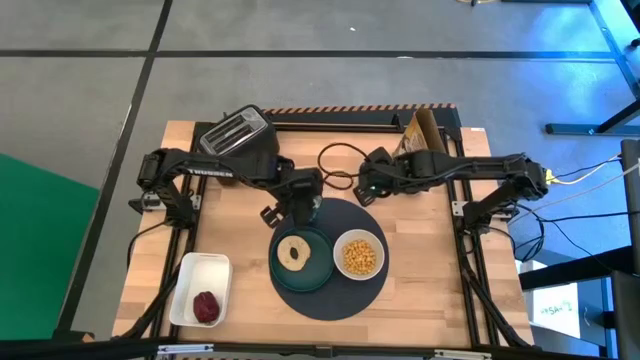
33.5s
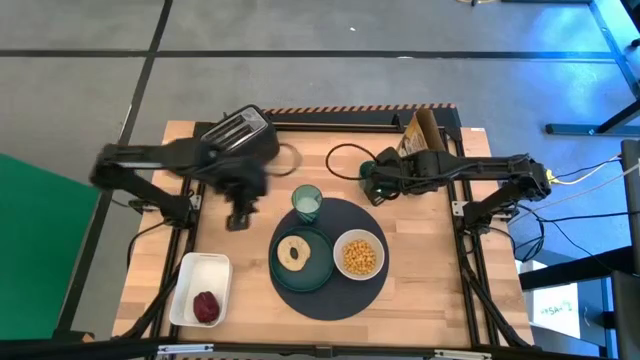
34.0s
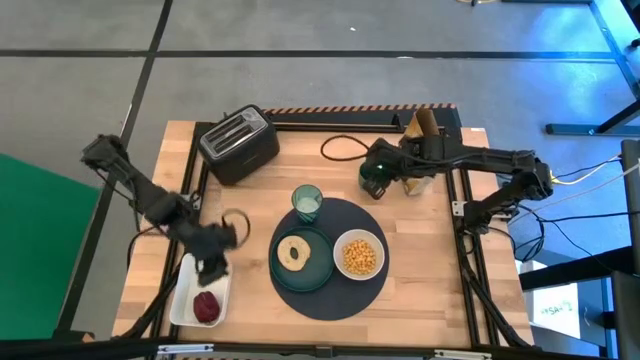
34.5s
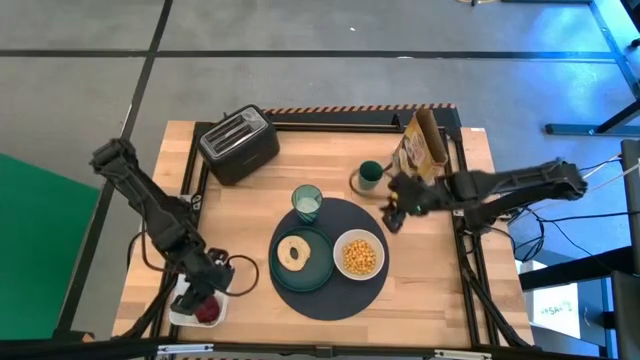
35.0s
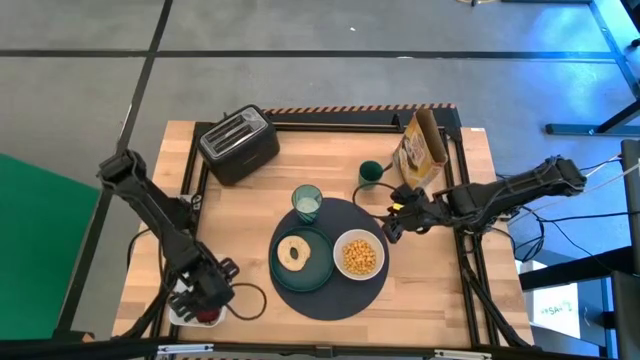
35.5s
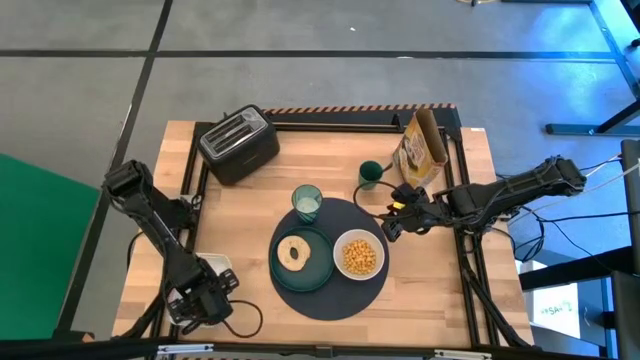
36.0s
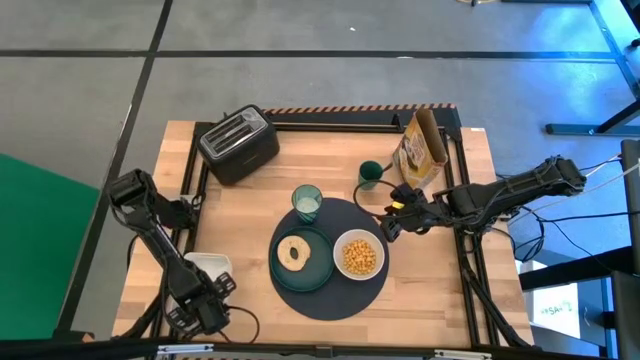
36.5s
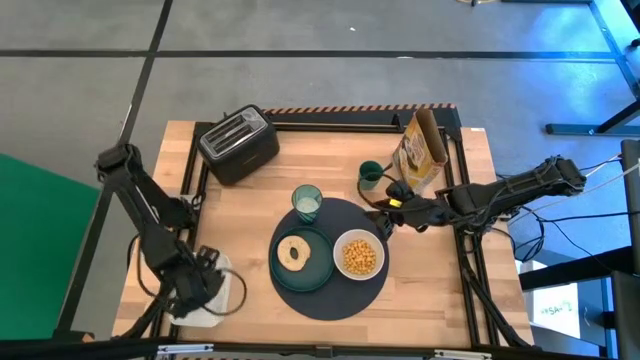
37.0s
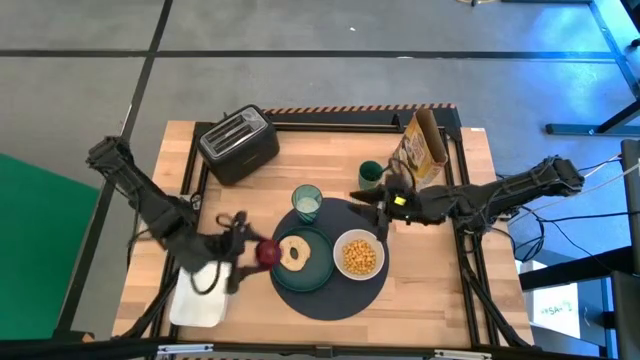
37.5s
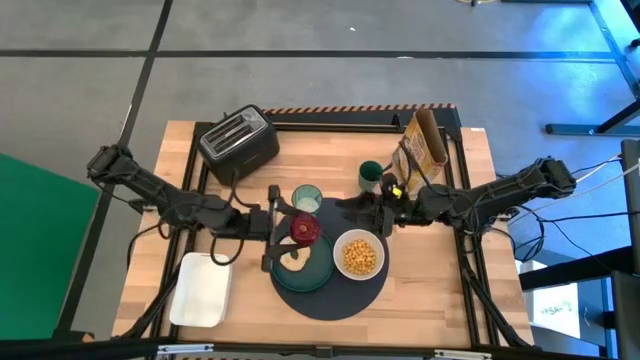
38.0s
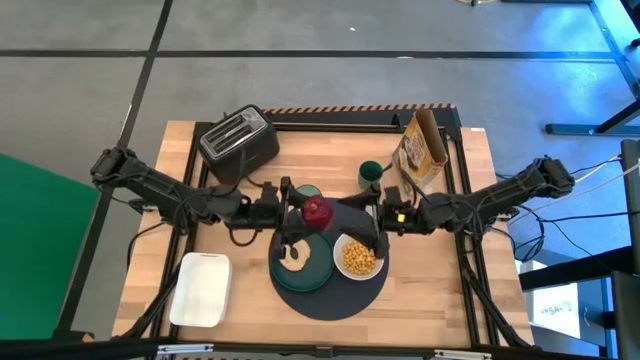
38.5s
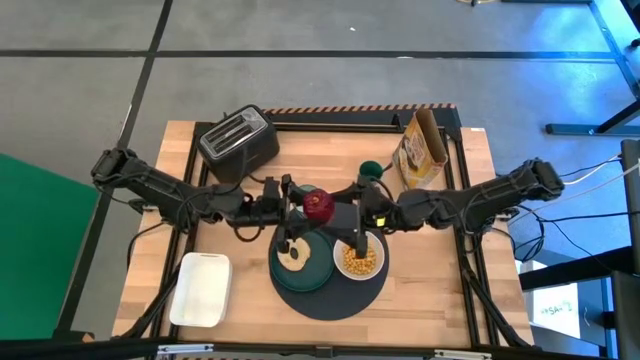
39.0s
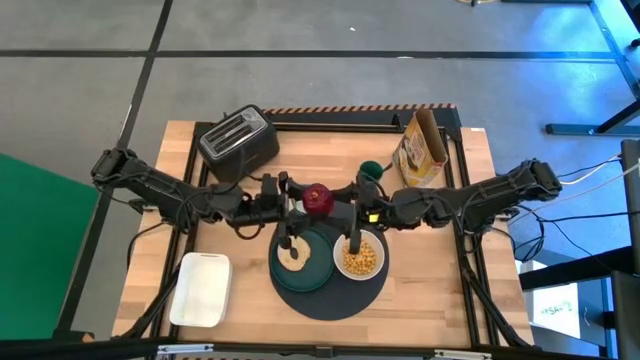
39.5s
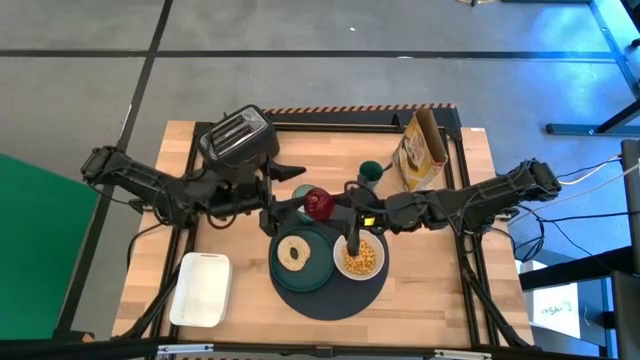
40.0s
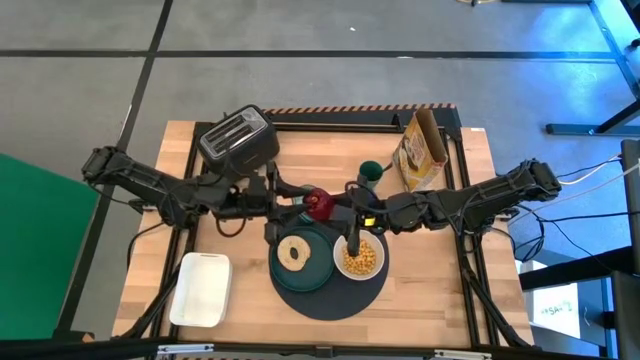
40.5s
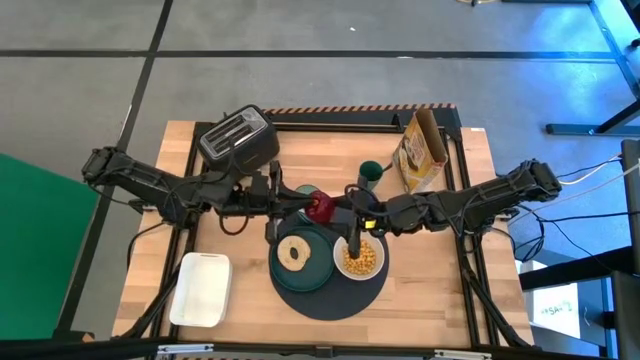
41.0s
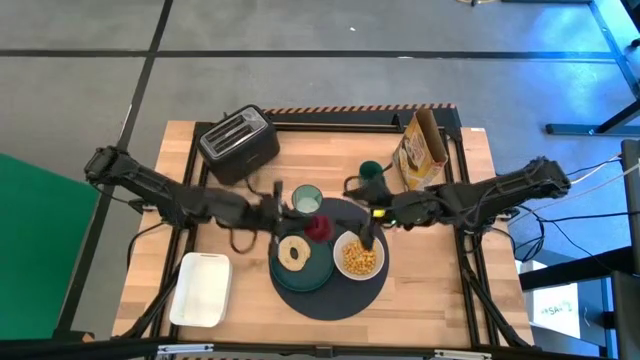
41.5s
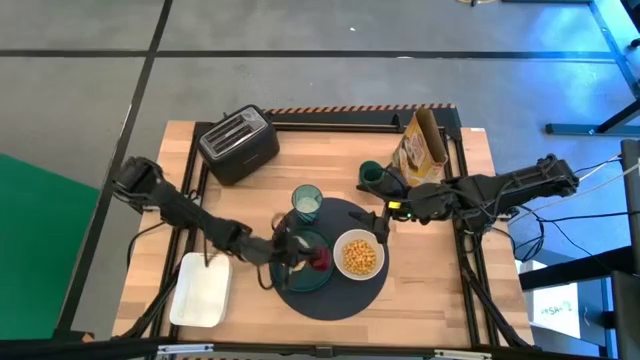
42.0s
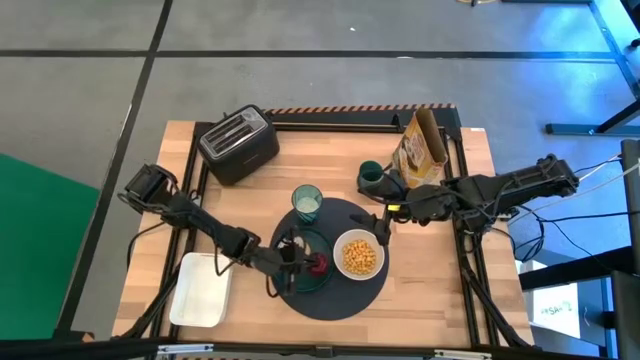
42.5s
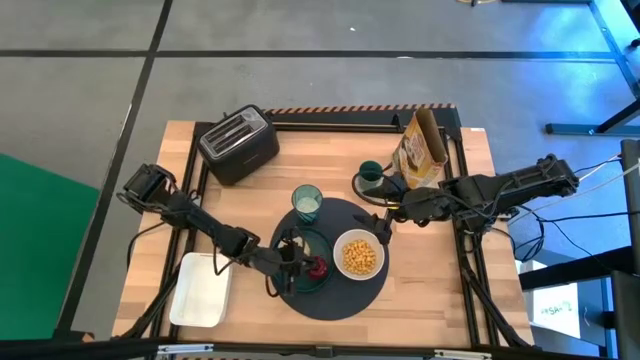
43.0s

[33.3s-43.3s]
Task: Arrange a breakfast setting
Put the red apple on the blue plate

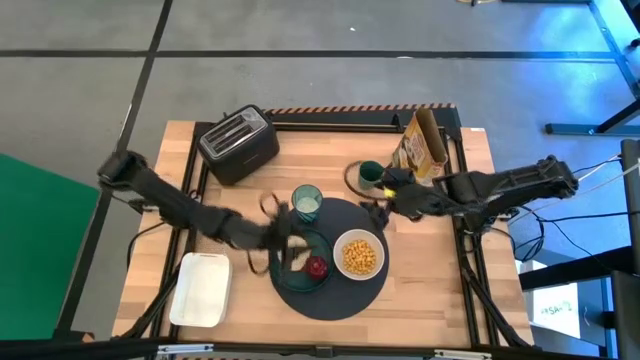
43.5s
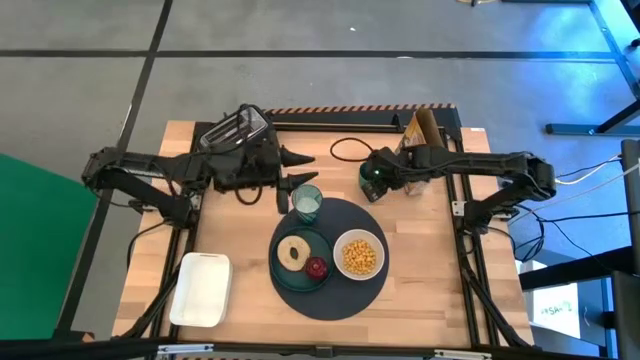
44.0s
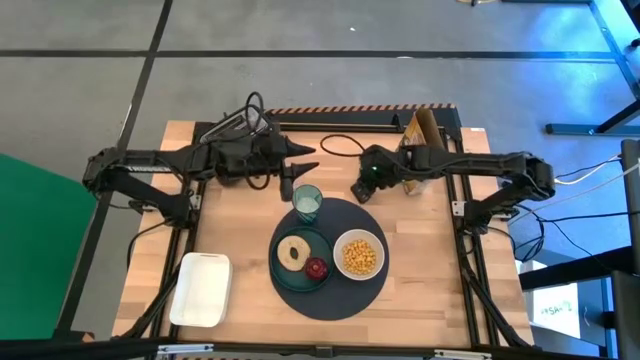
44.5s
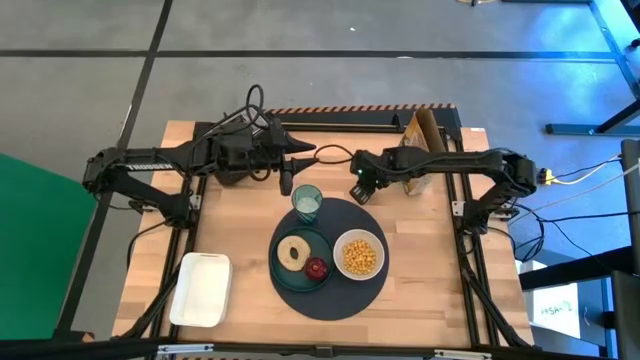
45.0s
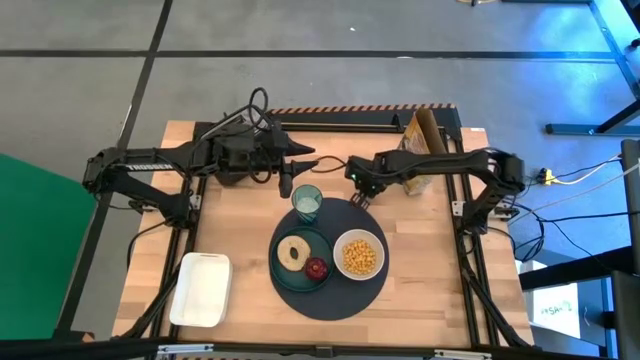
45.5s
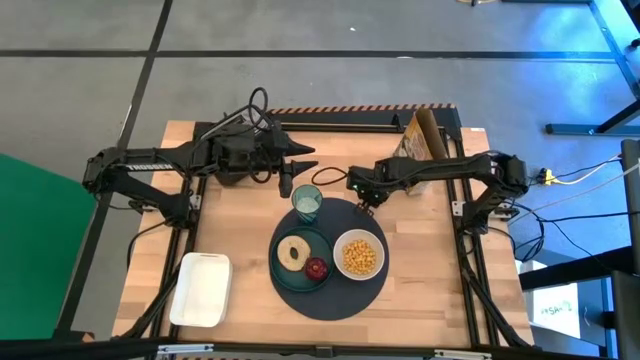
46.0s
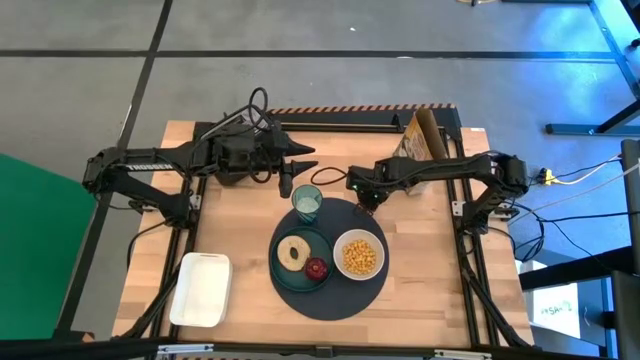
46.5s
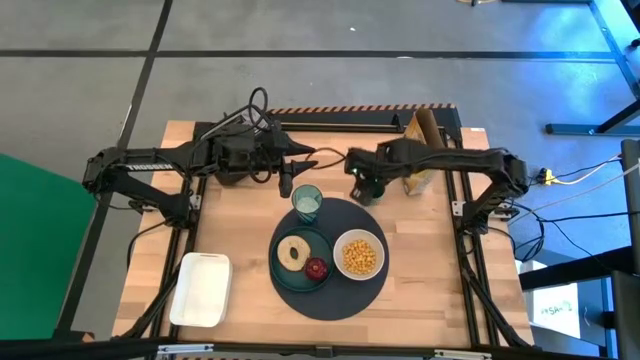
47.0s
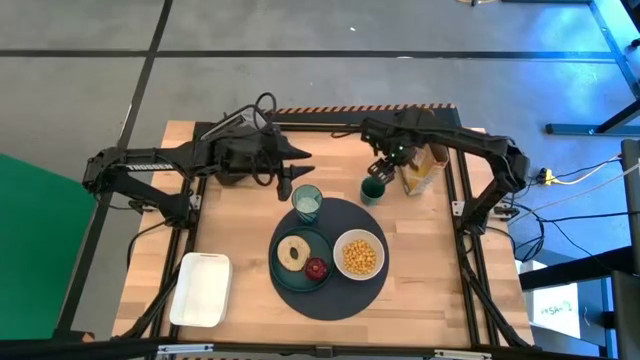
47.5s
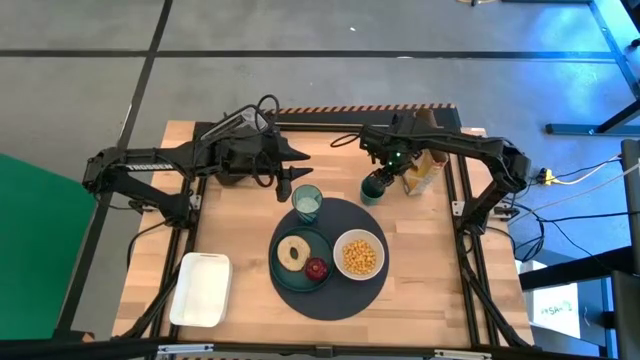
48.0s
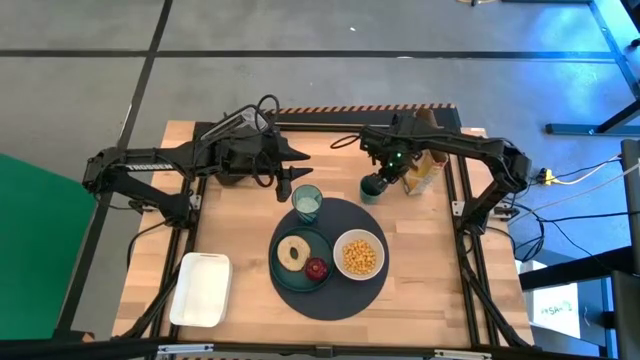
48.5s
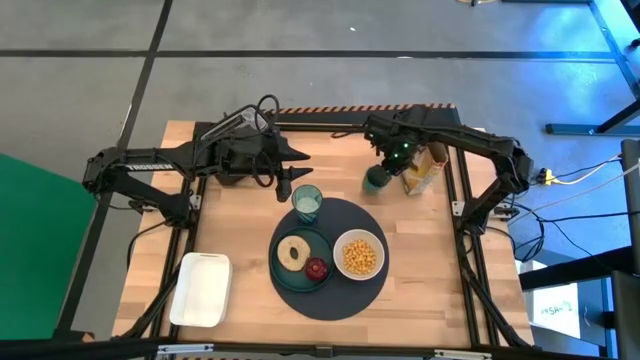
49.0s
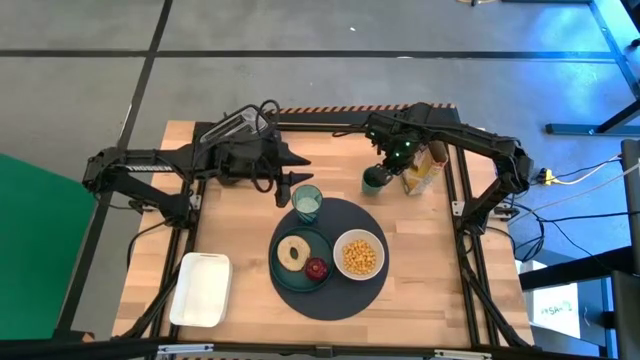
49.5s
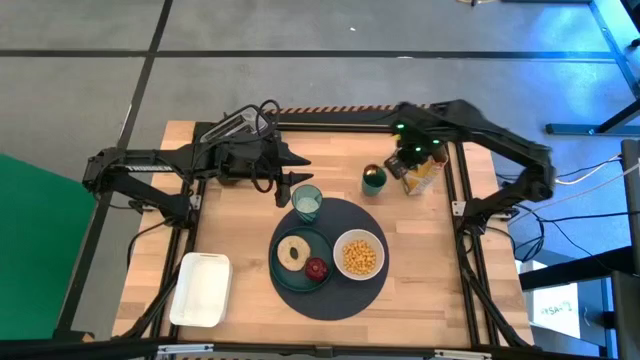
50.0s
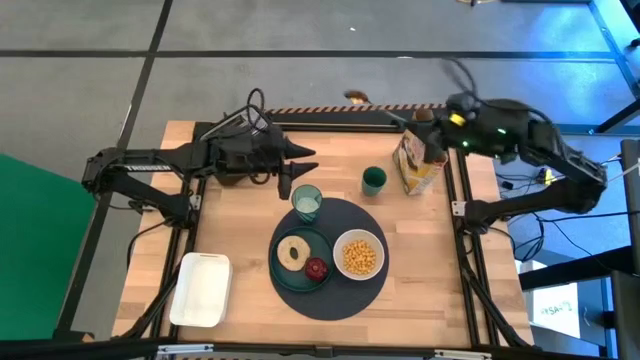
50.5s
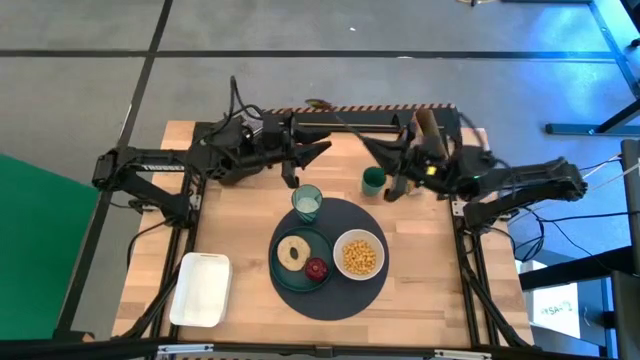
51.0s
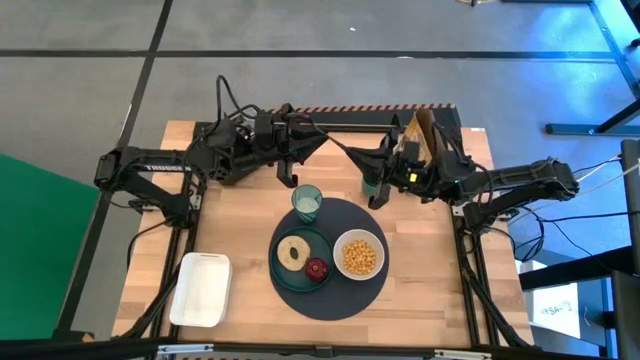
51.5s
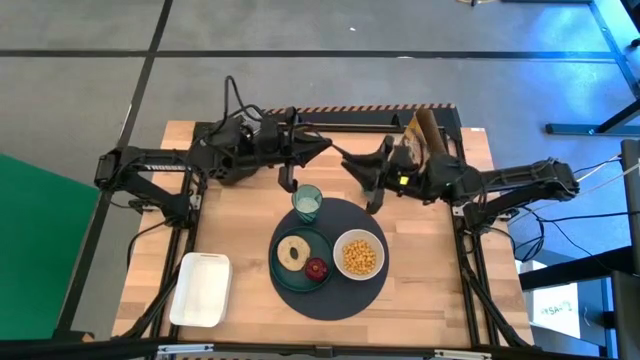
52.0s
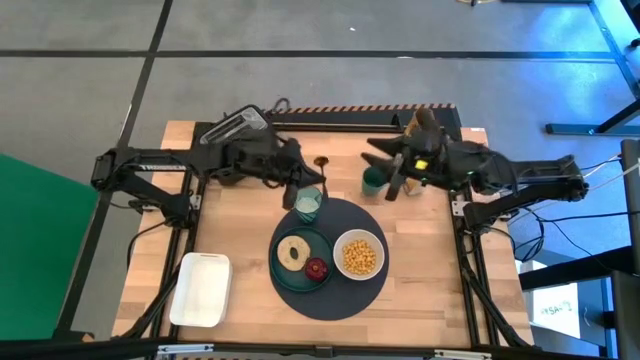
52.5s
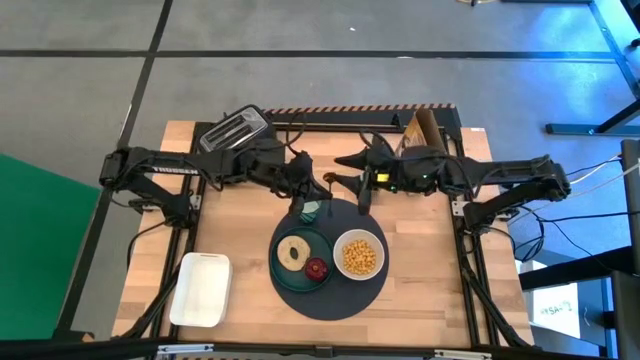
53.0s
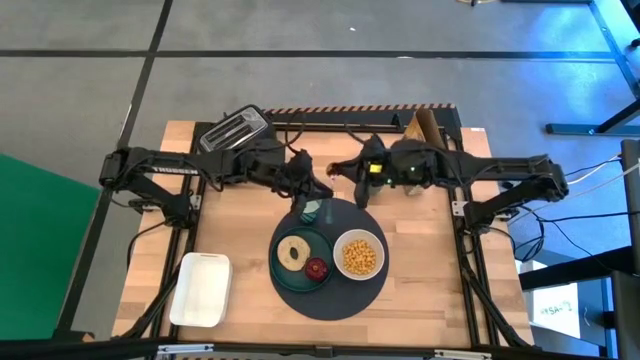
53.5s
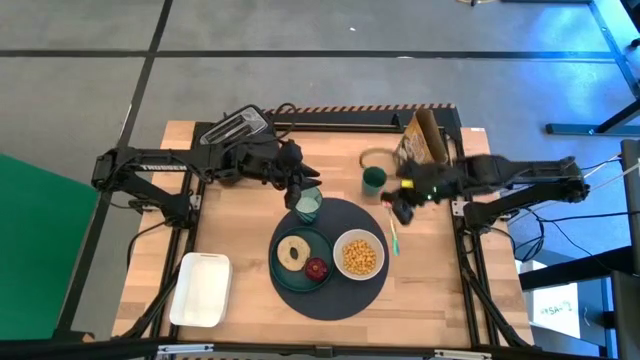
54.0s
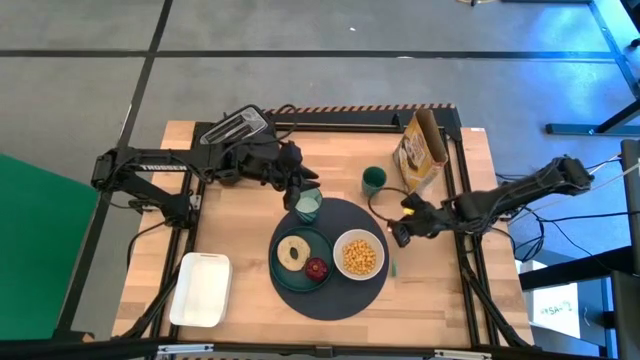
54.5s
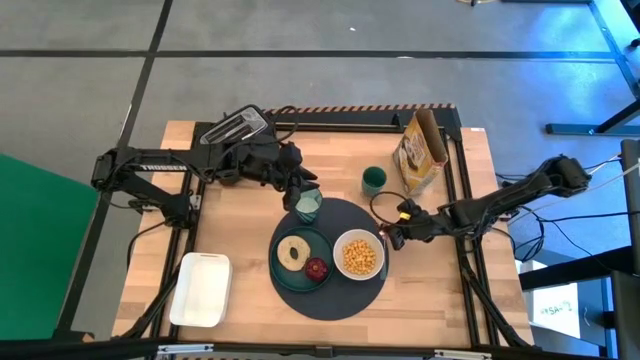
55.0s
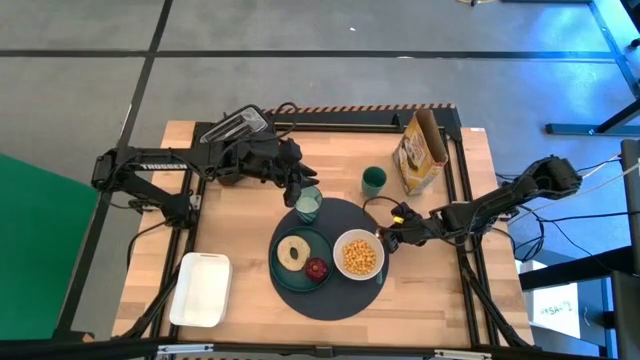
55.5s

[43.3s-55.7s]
Put the gold spoon on the blue tablemat to the right of the white bowl
